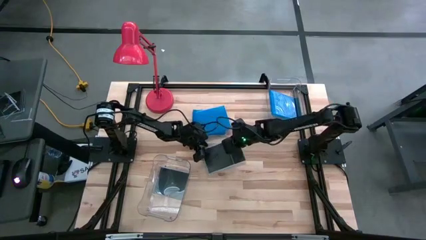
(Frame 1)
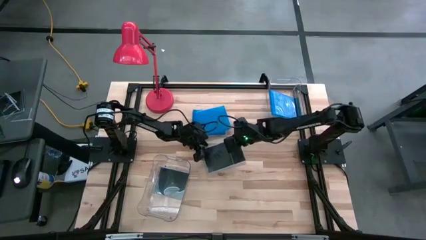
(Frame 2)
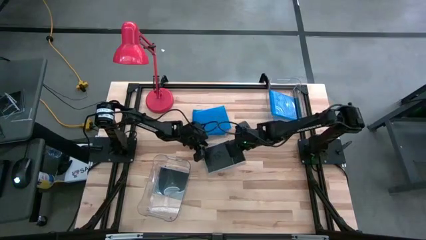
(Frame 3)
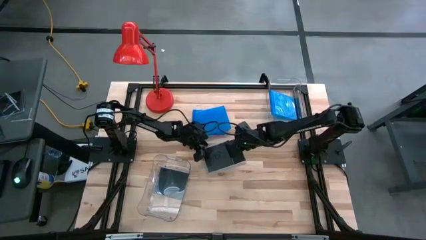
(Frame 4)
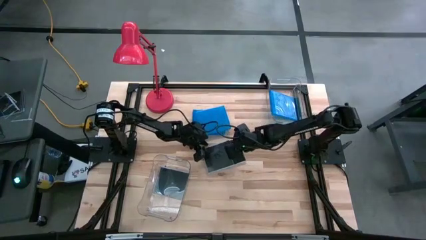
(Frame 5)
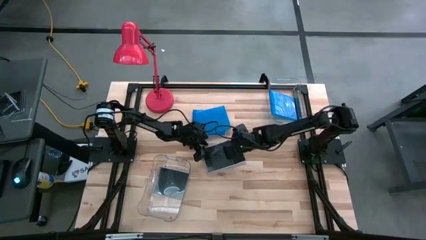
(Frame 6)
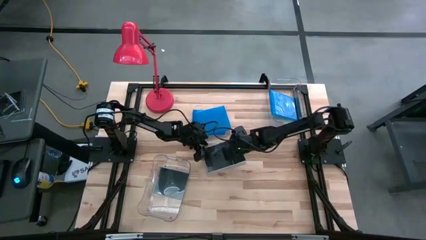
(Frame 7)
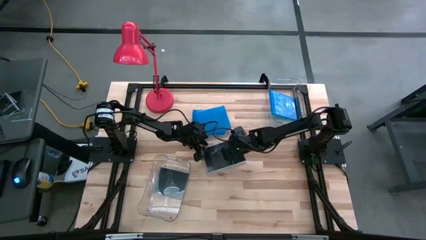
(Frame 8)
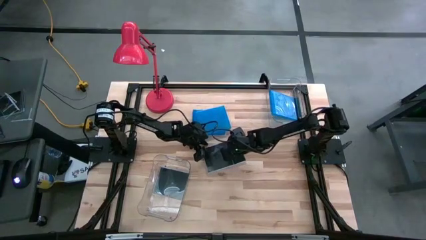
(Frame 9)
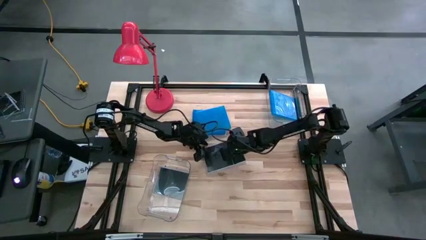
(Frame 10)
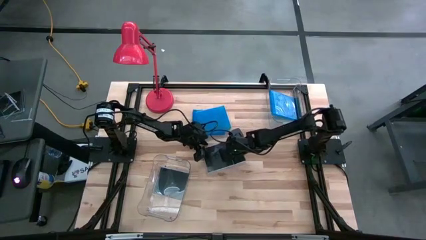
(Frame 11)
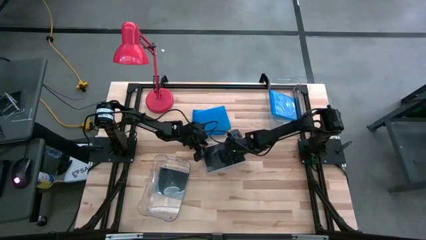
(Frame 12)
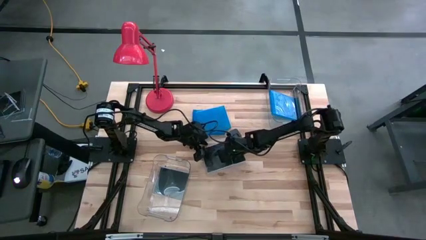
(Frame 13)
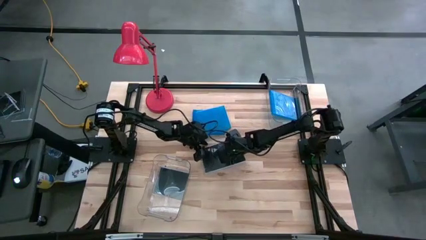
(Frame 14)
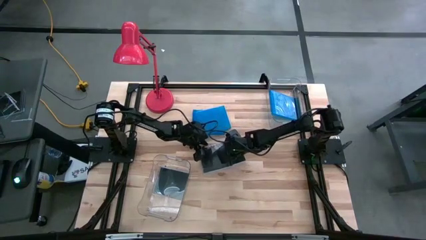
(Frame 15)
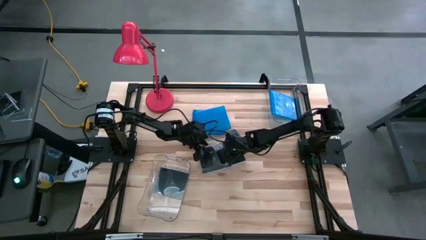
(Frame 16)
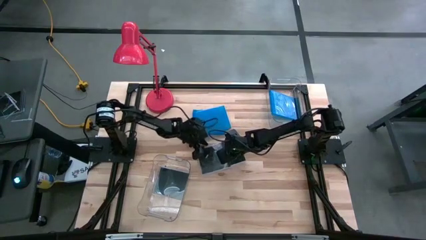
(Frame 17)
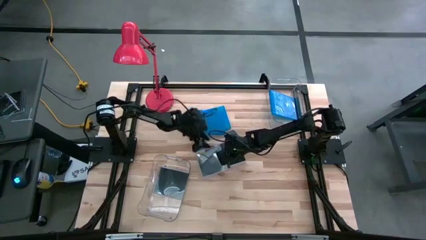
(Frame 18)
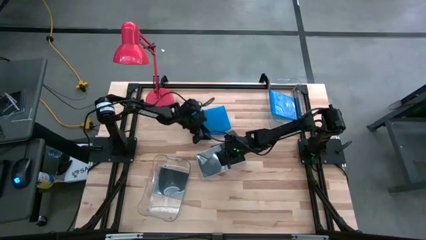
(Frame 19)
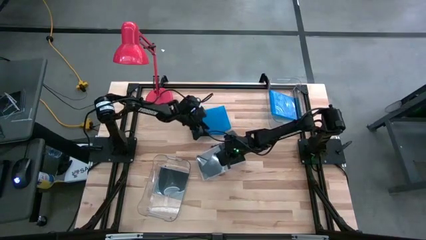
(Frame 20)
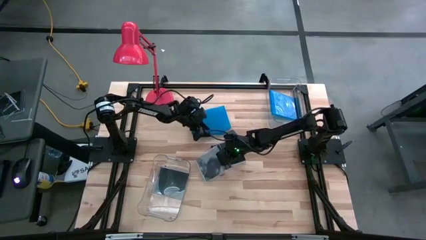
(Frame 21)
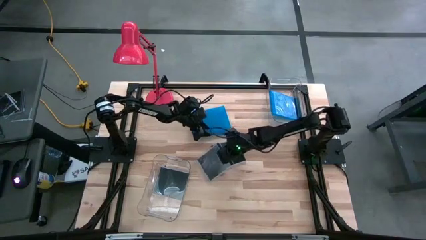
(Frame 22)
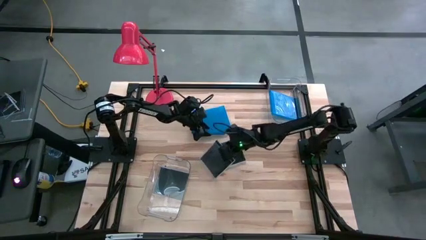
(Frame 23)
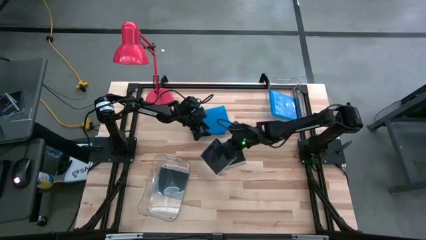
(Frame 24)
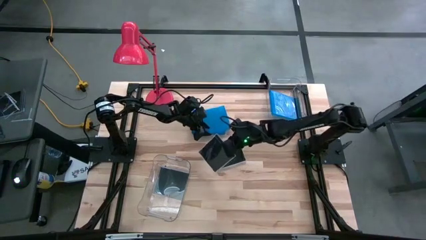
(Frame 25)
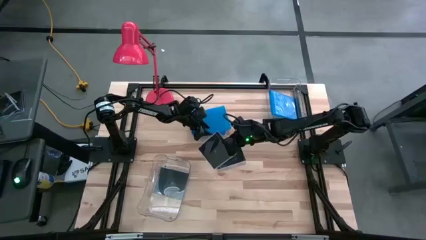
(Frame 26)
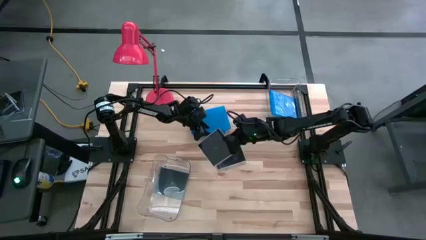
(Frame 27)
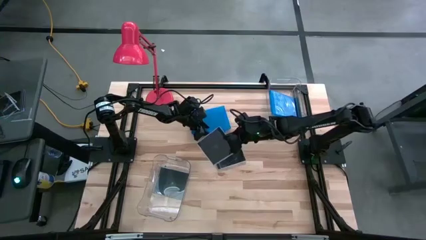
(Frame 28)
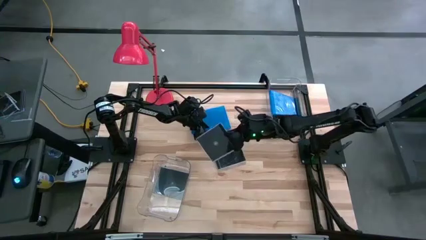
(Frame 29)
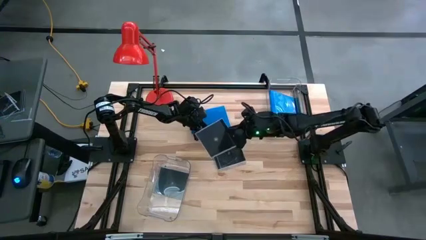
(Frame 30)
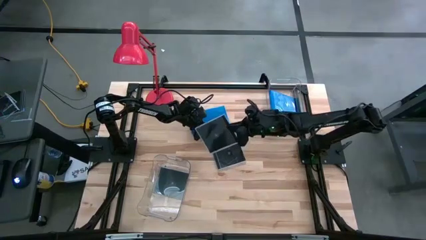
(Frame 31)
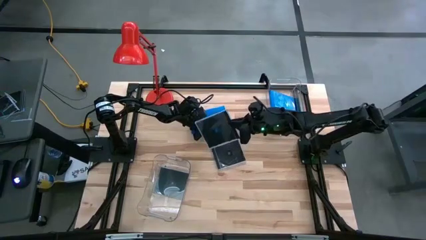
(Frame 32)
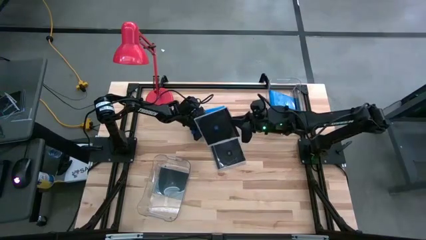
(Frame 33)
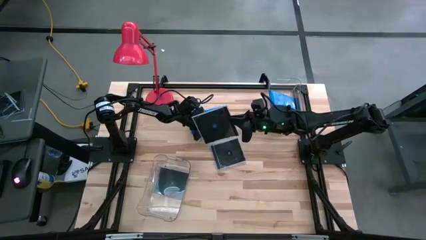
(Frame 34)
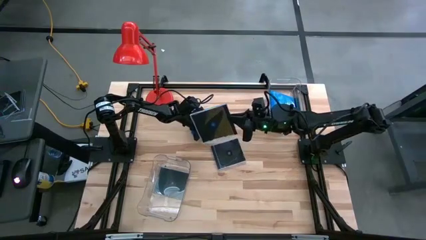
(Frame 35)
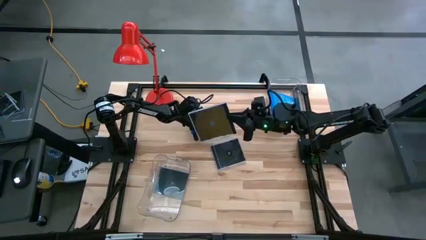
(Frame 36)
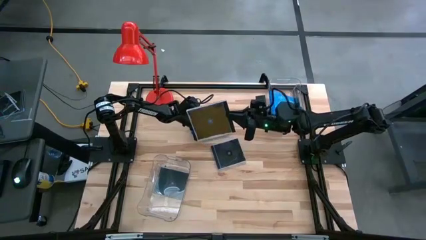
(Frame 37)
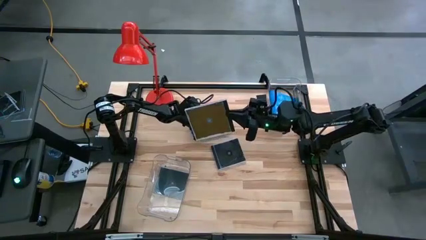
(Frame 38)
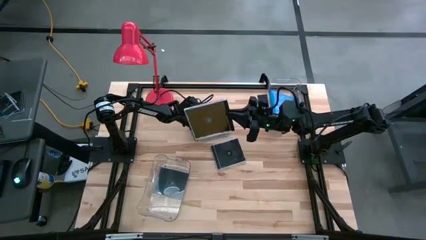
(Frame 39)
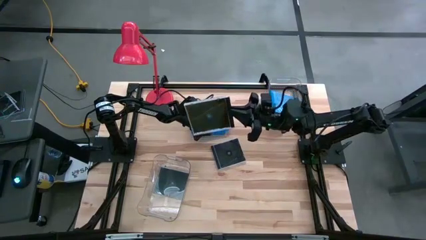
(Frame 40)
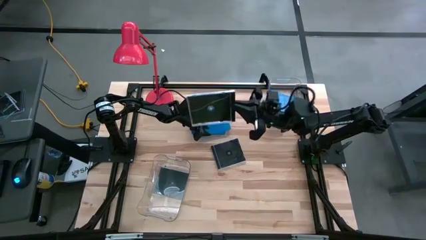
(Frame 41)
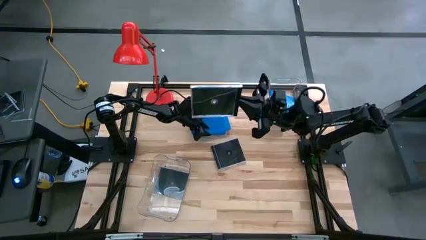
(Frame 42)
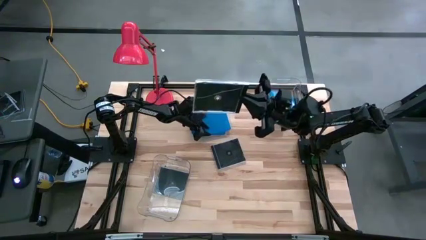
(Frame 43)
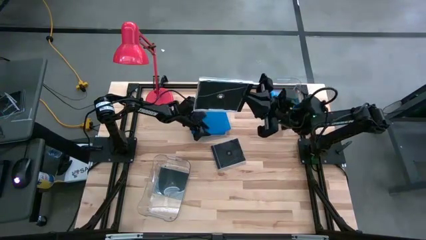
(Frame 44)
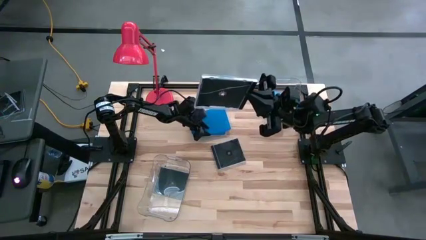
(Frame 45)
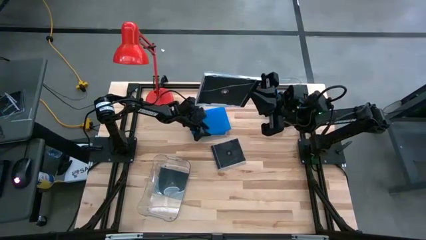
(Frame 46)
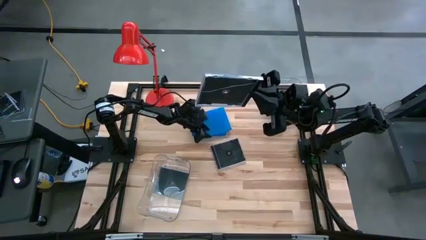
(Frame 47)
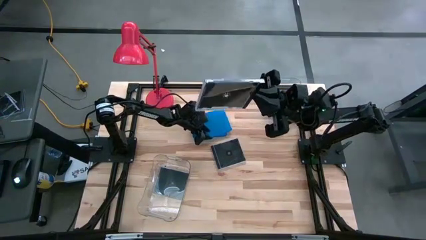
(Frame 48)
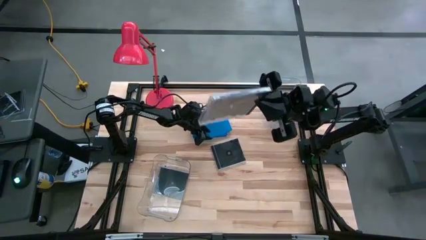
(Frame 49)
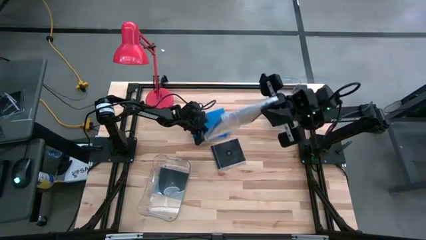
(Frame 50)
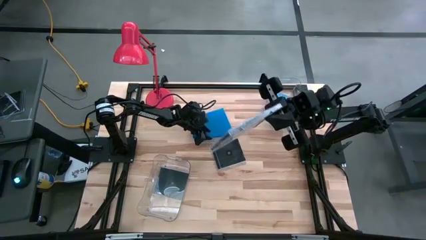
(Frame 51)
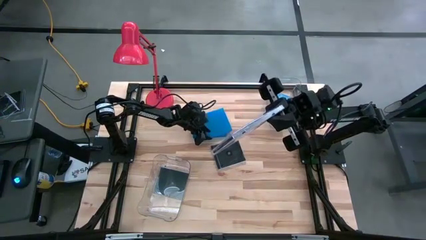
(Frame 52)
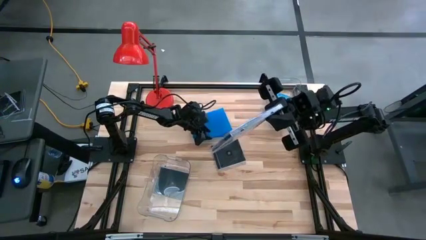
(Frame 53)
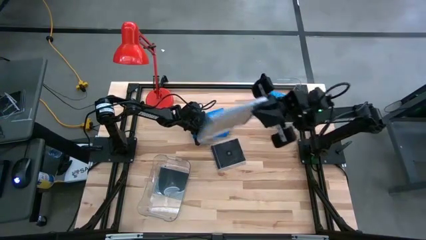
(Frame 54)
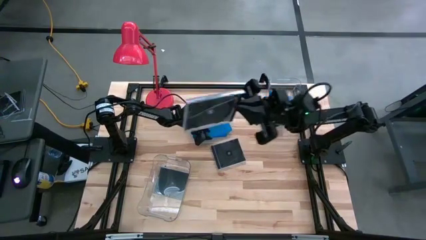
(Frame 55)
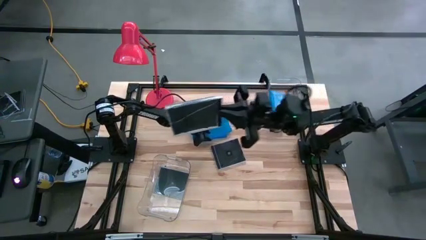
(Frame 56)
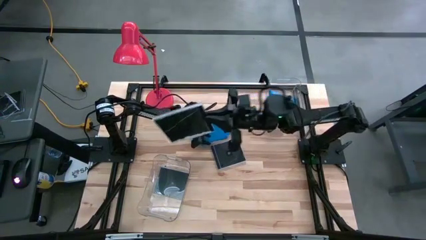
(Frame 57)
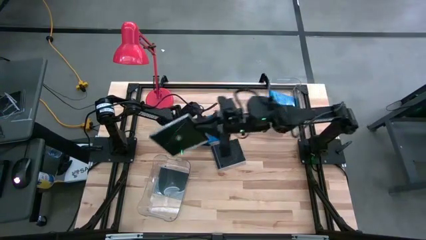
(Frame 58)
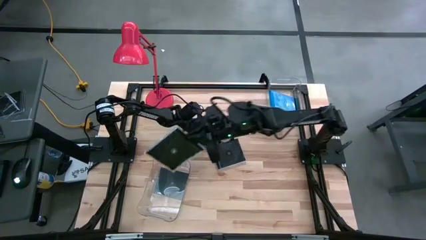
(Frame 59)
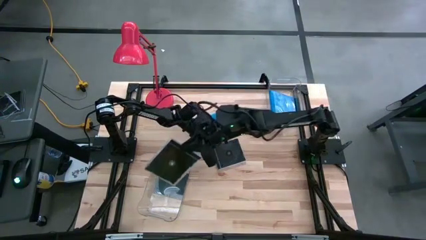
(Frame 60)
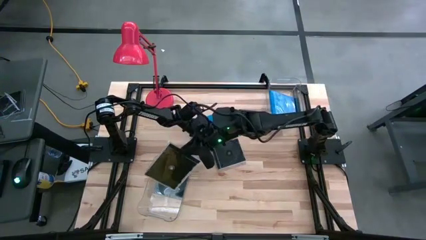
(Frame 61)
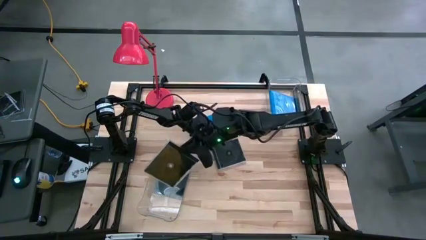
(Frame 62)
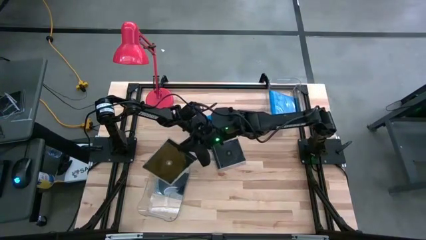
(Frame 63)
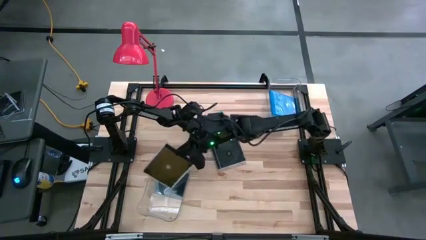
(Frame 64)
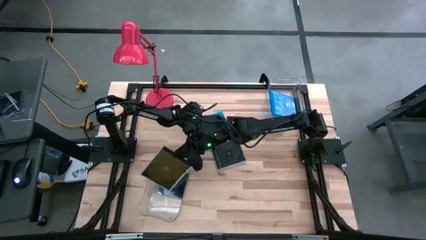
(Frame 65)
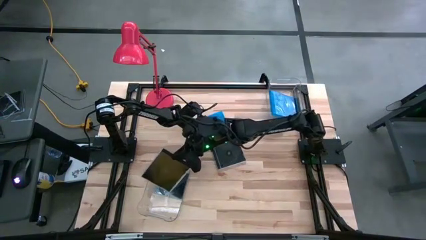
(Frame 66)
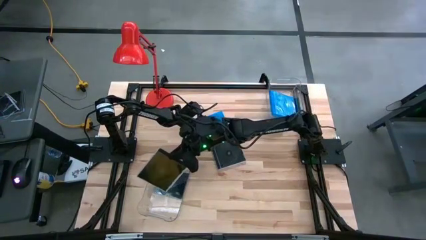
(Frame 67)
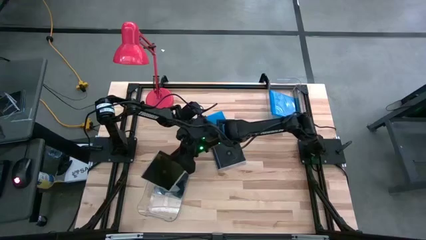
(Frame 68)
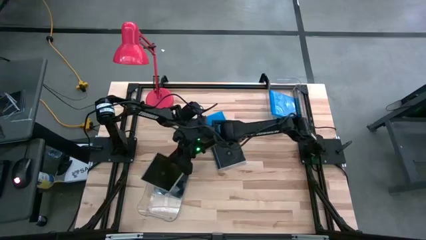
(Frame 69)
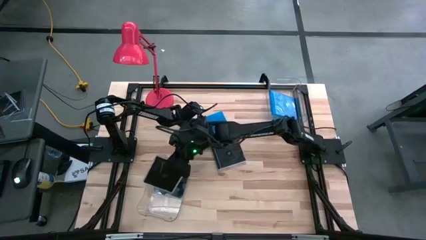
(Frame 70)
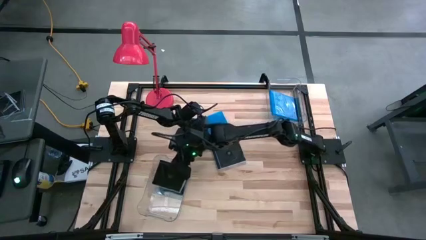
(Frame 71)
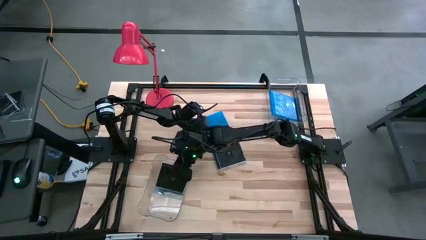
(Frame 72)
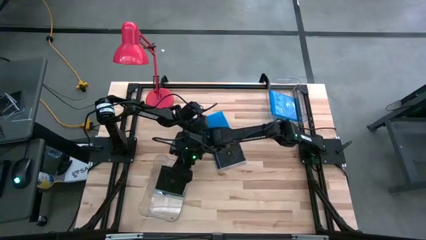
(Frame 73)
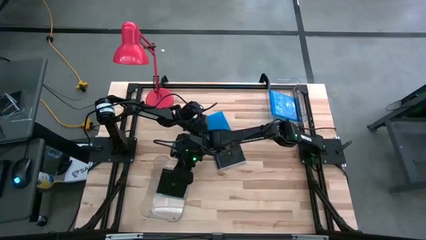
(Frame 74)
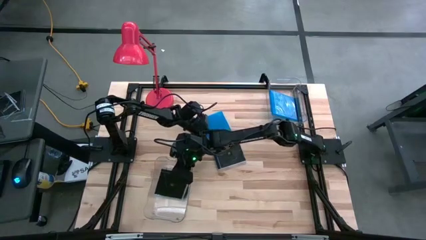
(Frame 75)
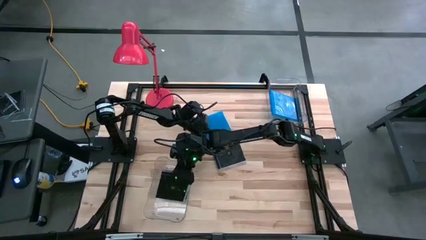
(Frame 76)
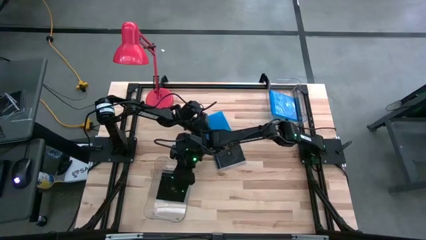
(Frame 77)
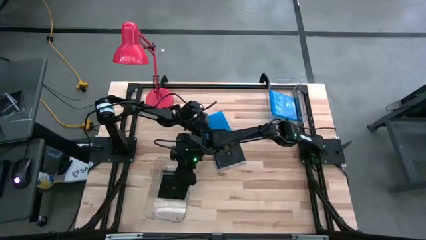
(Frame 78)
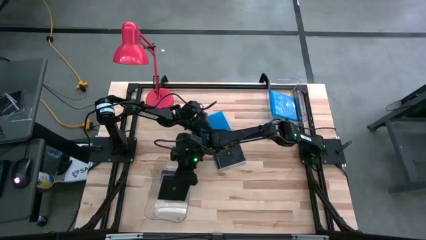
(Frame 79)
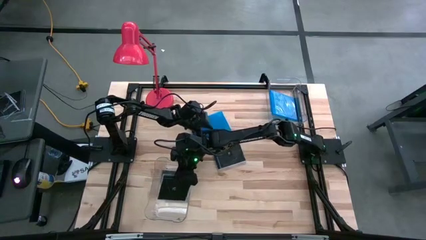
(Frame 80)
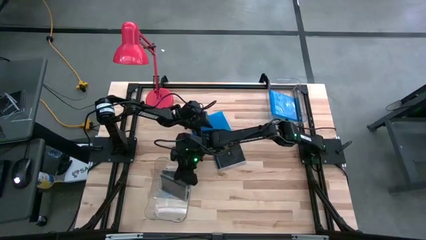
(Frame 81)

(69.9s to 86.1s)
Task: Pick & place jewel cases by type
Put the black cd case into the bottom transparent bin
